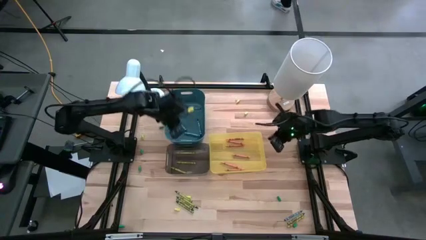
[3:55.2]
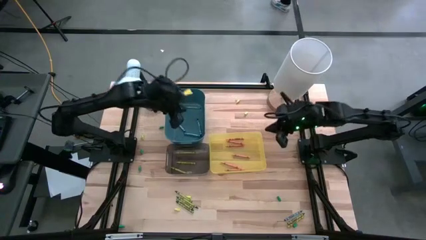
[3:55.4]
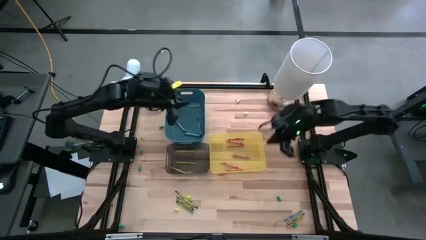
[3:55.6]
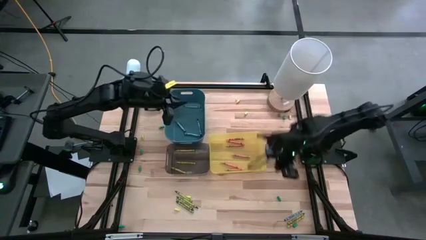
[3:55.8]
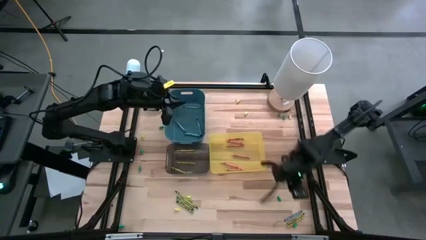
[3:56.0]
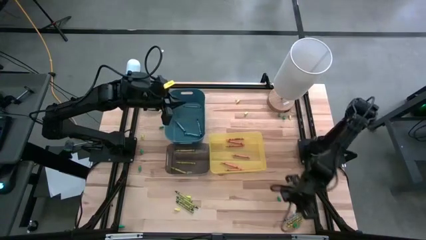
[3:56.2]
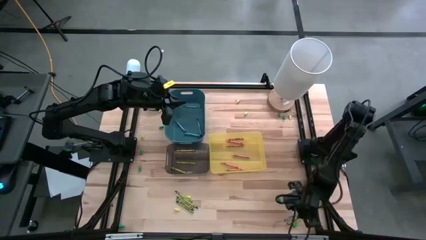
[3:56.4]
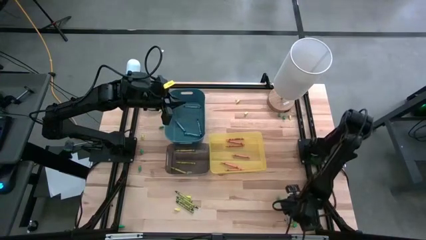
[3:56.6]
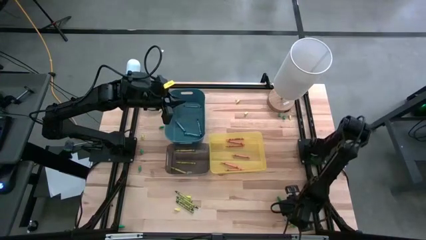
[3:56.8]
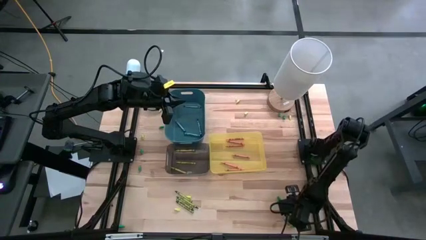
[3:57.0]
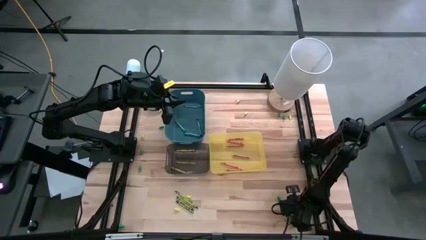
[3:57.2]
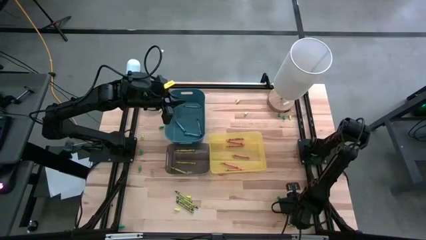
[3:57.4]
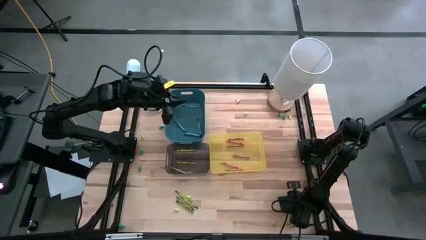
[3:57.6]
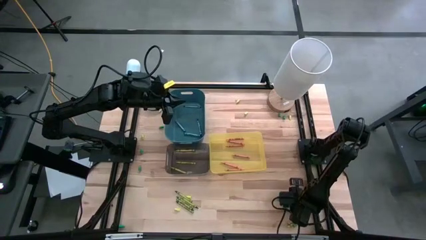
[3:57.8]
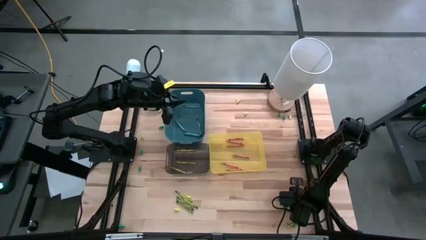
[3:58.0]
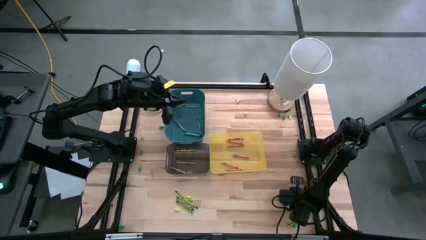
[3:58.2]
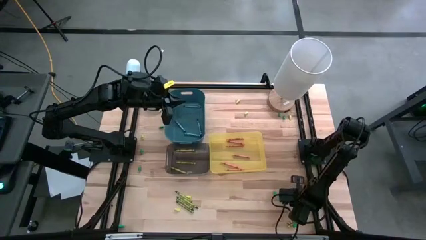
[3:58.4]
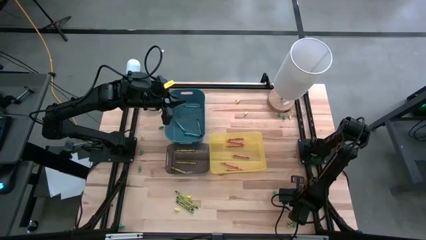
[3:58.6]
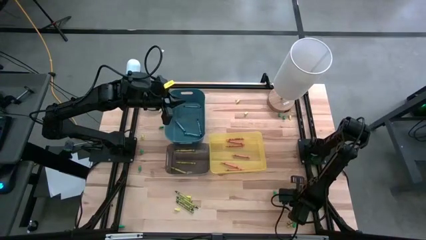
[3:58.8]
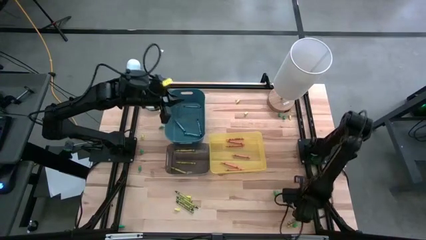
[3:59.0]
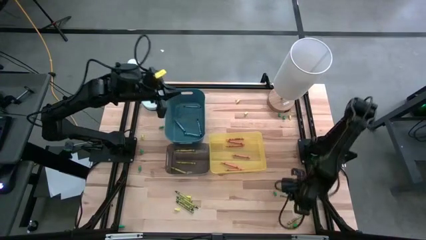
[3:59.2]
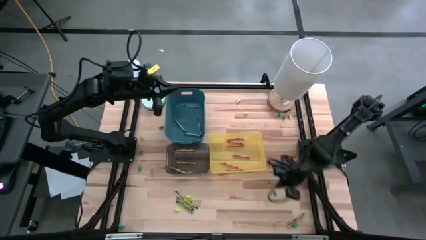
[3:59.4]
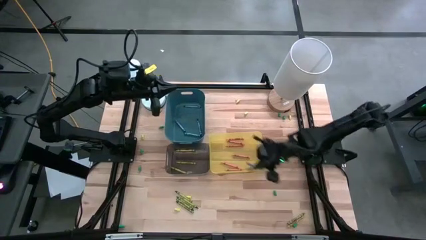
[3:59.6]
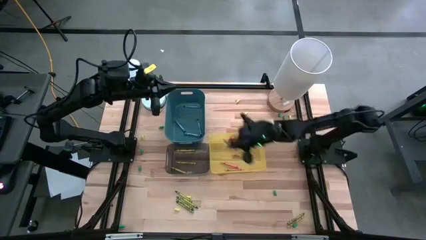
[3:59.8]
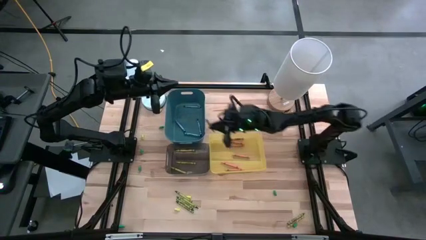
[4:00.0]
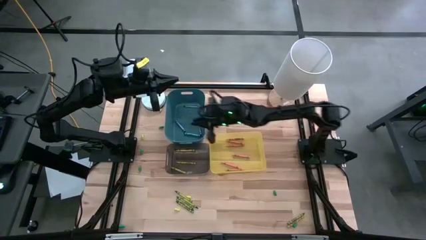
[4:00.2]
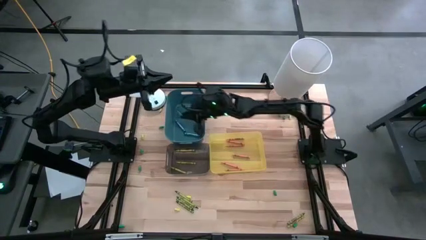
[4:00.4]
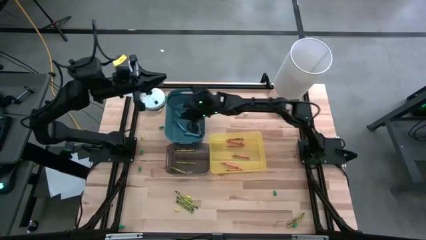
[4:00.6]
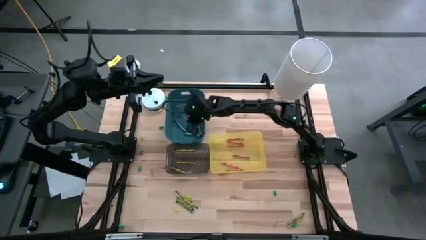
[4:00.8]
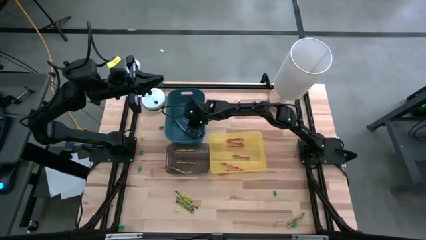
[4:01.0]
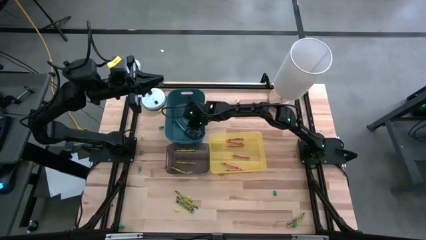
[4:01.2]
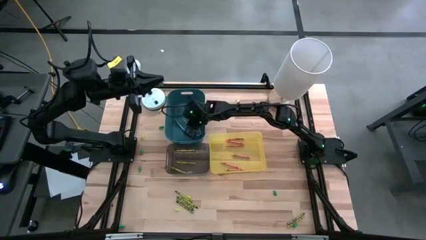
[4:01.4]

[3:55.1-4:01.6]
Task: Sort crayons
Put the blue crayon into the blue bin

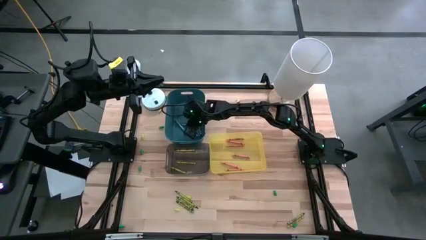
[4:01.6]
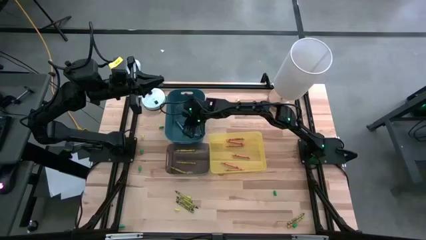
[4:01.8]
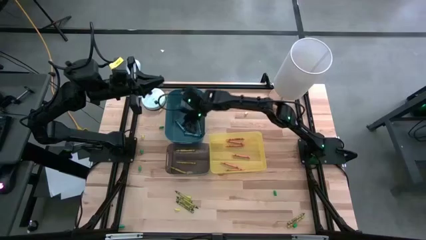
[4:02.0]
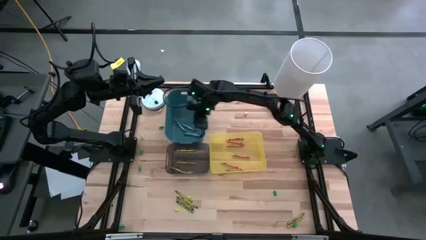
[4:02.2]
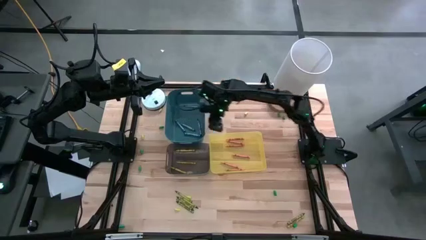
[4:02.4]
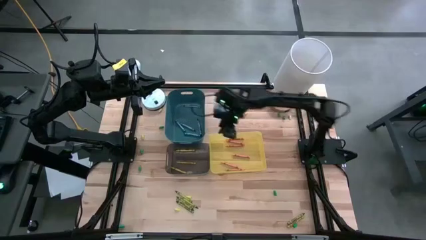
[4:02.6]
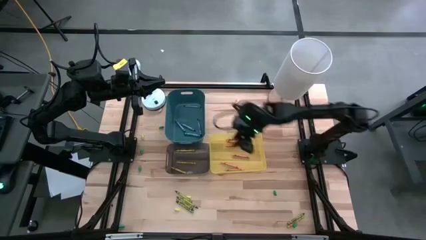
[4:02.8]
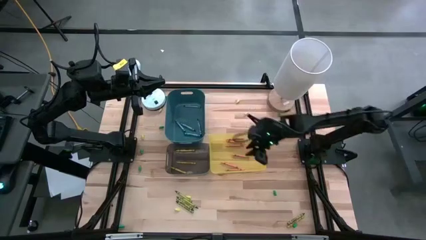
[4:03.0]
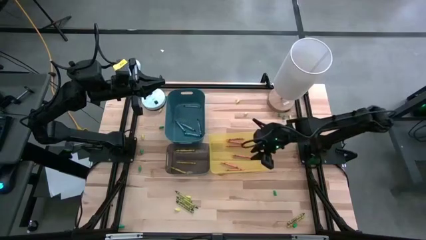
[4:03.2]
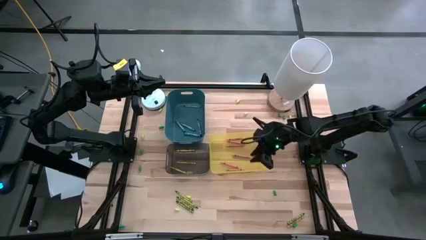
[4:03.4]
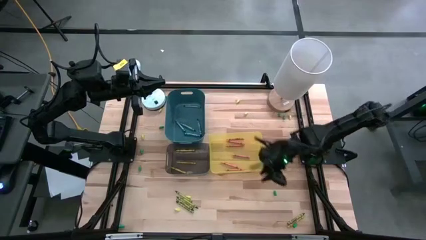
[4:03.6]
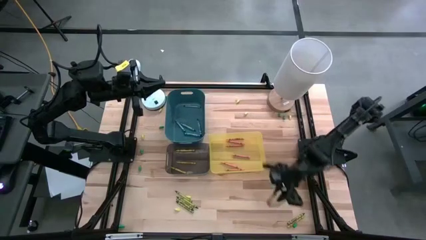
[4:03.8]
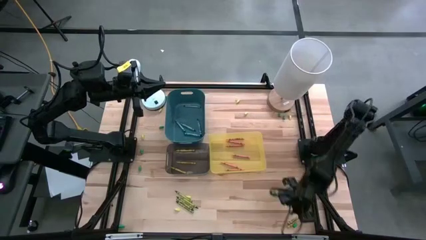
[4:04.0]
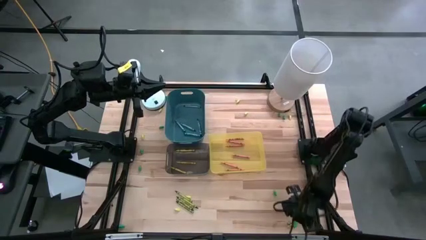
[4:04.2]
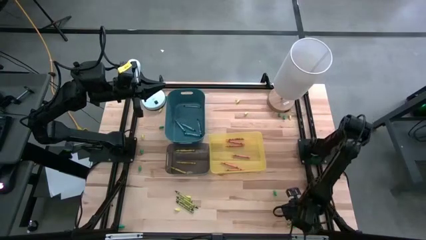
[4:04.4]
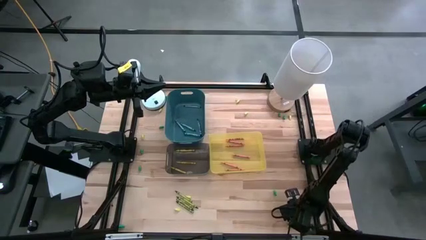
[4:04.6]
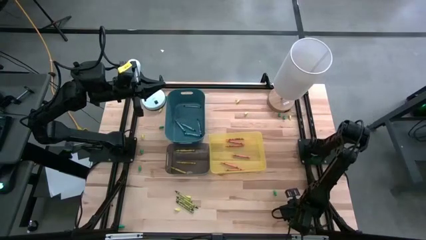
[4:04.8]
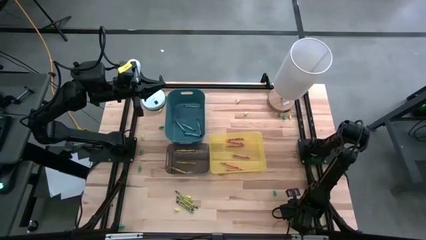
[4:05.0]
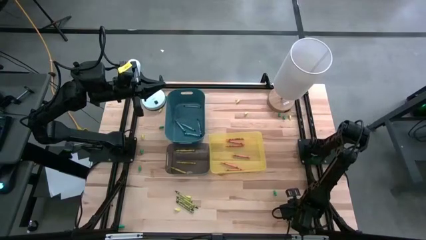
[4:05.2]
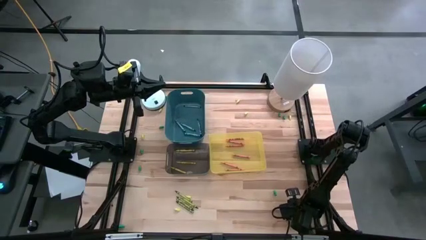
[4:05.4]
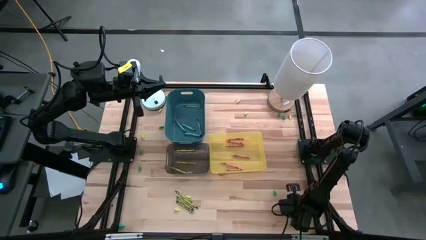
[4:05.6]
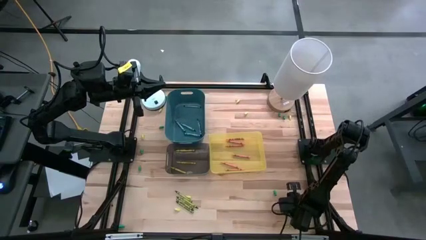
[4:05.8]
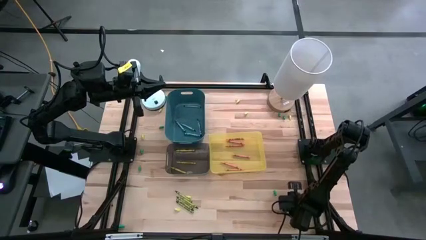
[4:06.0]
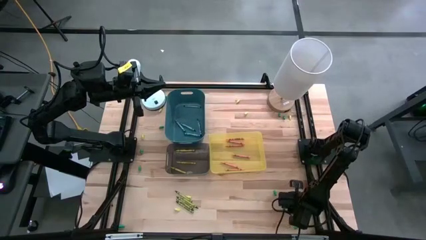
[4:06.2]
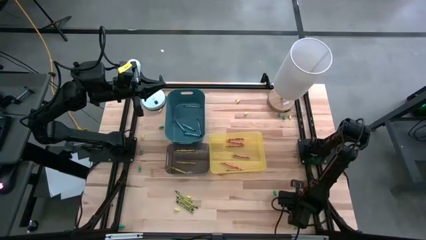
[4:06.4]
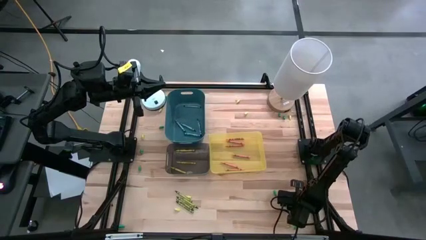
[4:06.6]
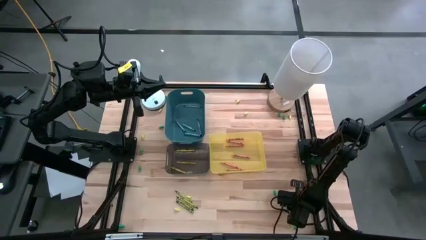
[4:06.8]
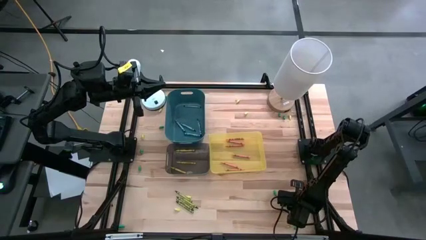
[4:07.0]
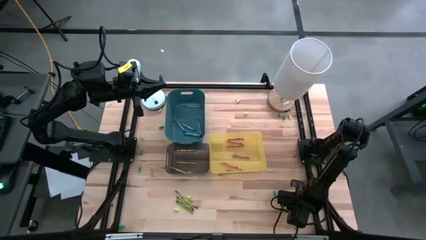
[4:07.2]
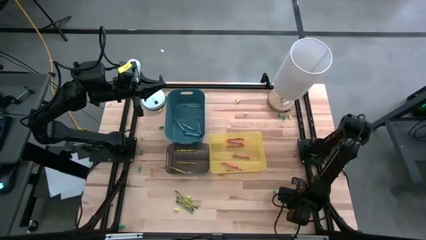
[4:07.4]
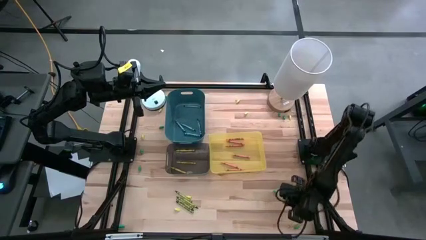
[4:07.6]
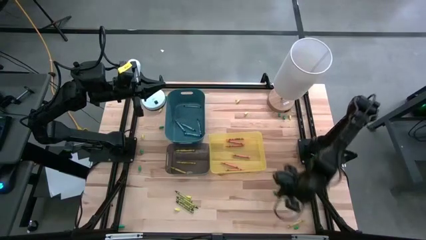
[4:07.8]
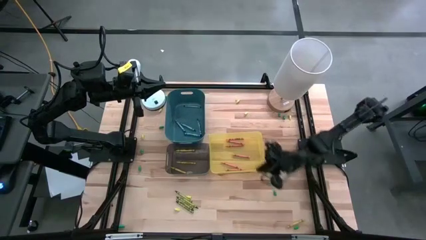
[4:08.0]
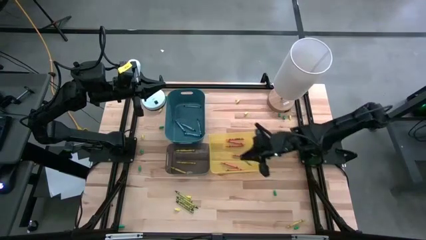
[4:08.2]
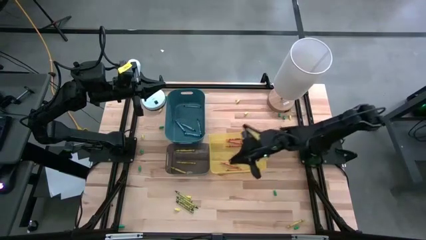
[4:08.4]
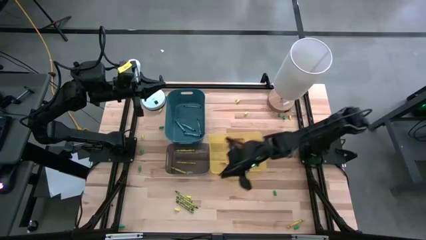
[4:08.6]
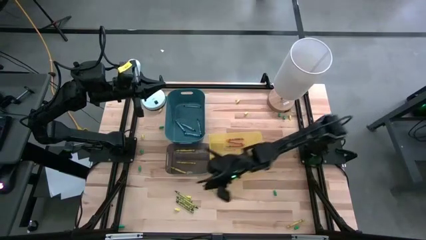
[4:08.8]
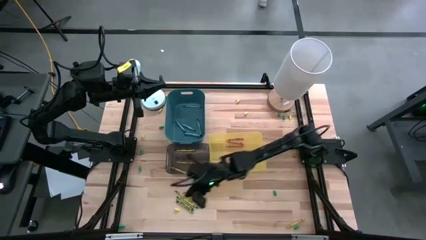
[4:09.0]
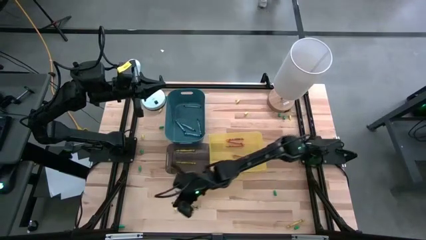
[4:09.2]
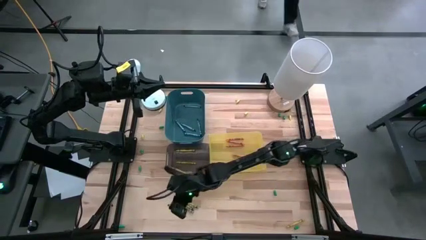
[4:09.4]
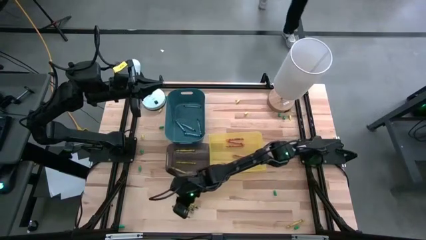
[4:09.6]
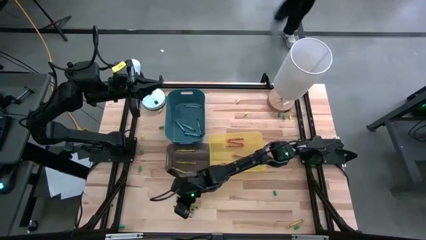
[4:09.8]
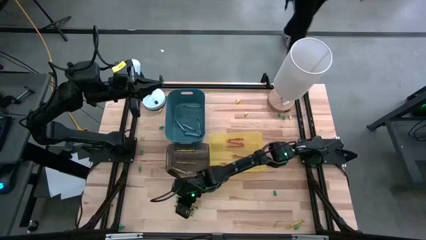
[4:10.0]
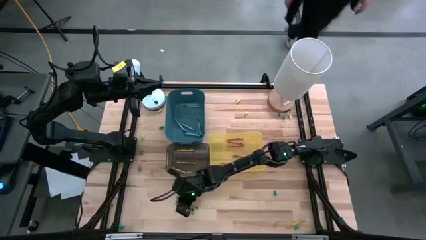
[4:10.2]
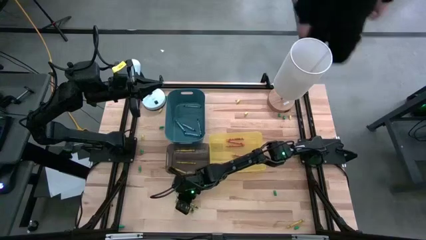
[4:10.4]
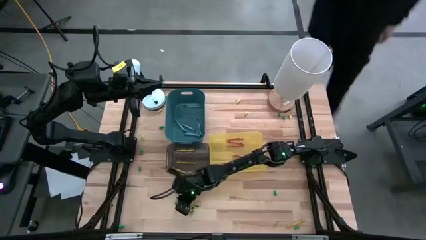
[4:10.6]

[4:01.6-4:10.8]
Move the green crayon to the bottom left of the table

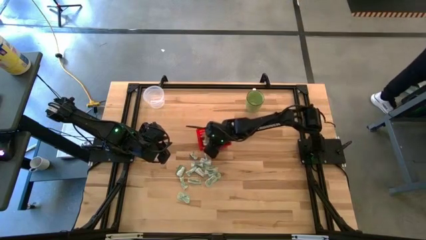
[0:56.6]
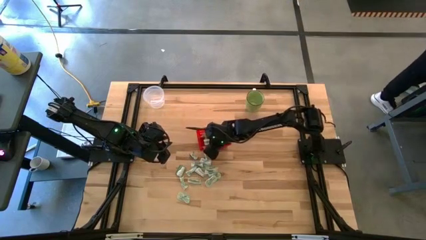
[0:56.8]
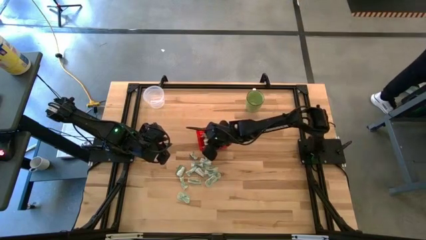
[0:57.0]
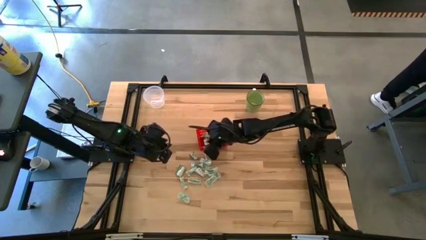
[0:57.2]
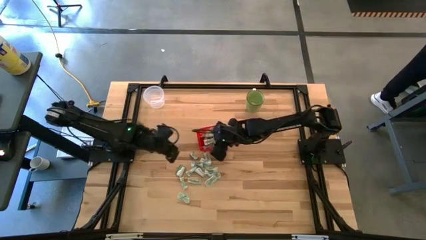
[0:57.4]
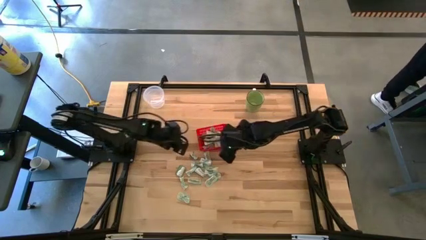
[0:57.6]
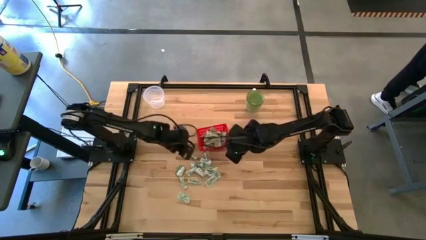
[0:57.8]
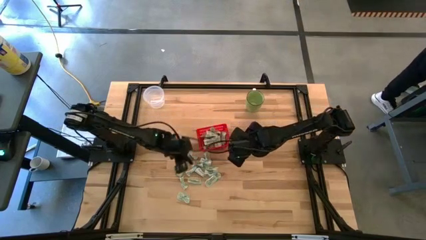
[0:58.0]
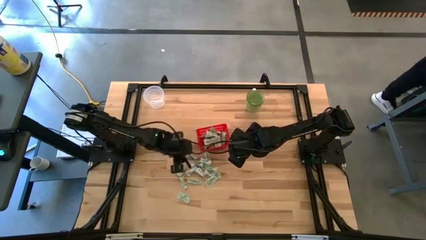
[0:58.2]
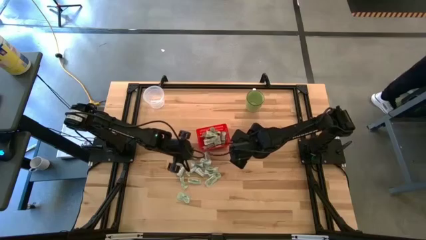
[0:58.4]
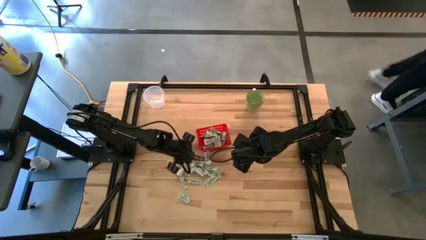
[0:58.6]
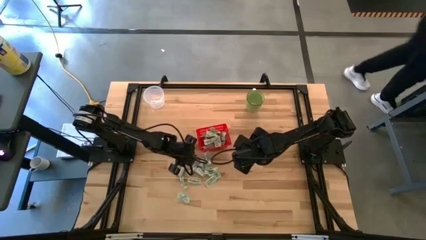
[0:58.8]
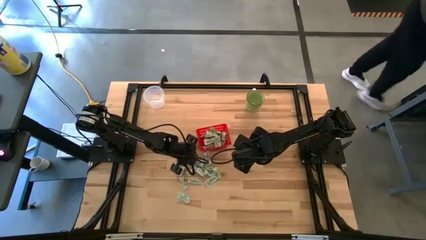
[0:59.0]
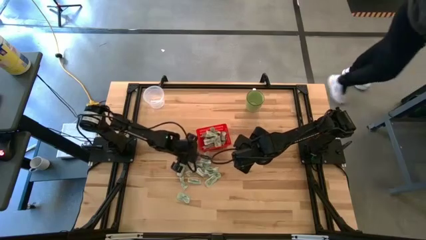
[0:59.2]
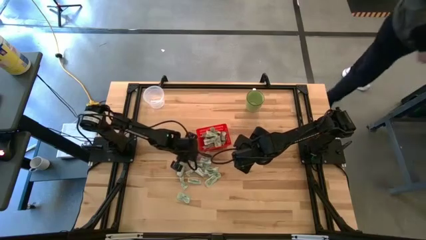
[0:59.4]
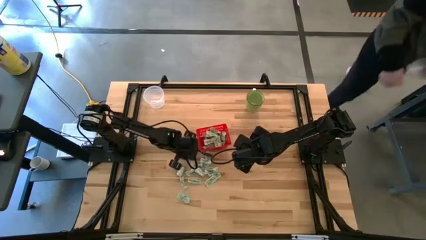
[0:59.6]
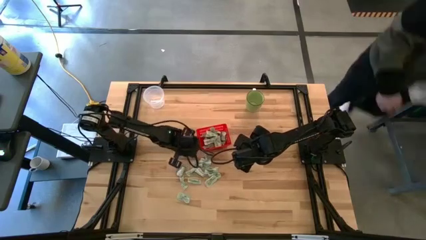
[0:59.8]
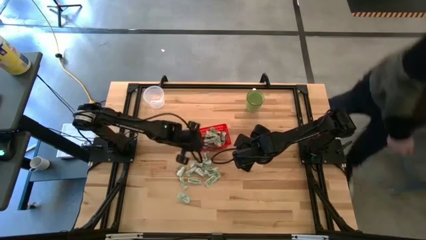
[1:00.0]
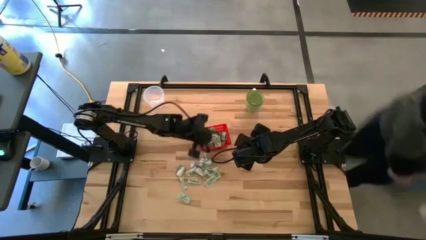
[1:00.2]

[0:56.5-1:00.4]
Task: Pick and place Stevia / Truvia into bins
Put the truvia packet into the red basket
